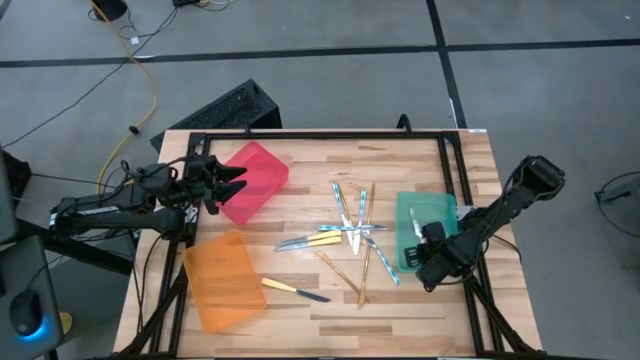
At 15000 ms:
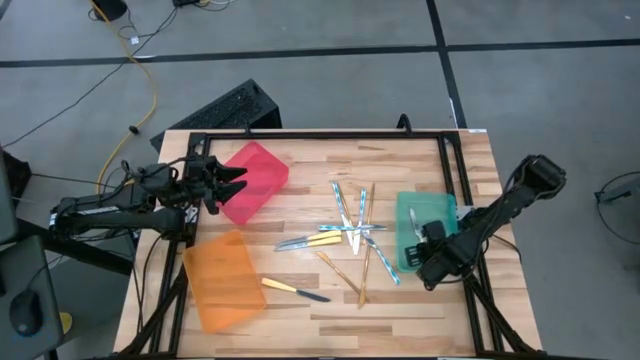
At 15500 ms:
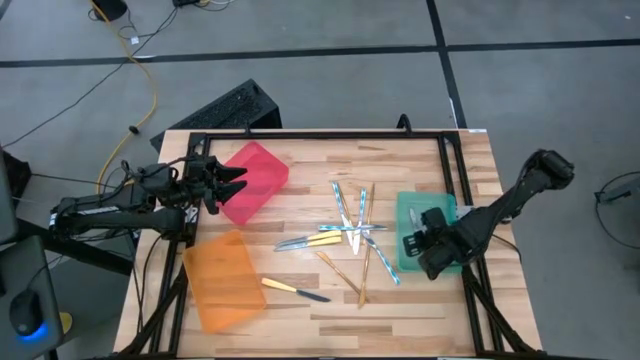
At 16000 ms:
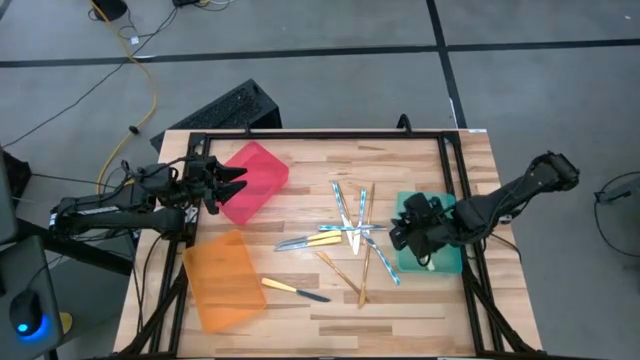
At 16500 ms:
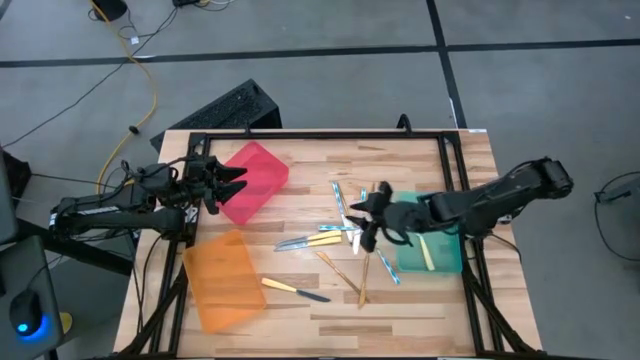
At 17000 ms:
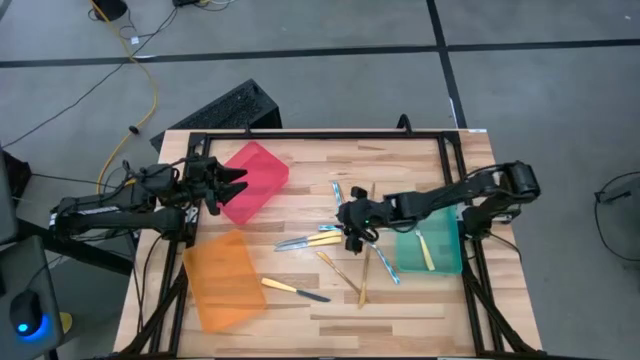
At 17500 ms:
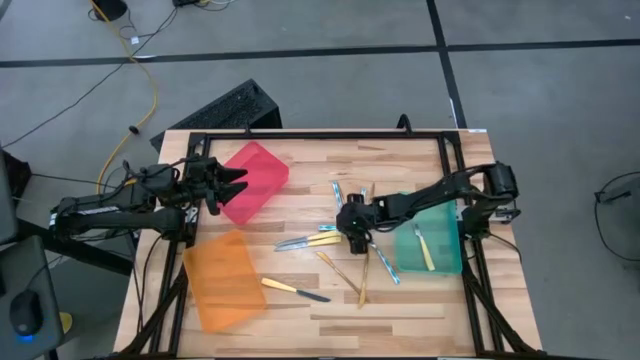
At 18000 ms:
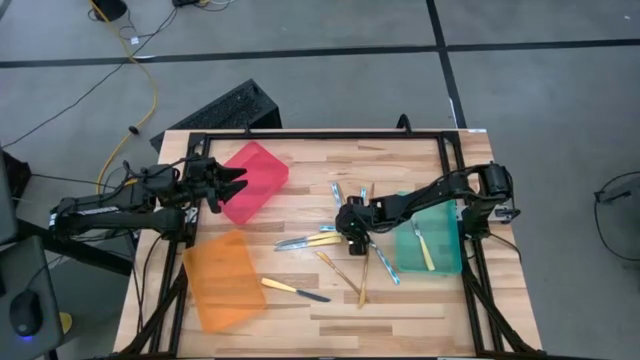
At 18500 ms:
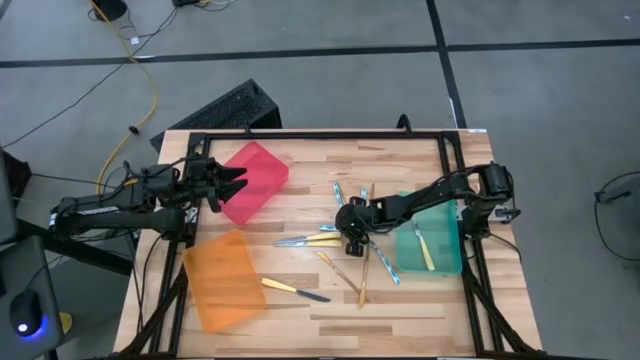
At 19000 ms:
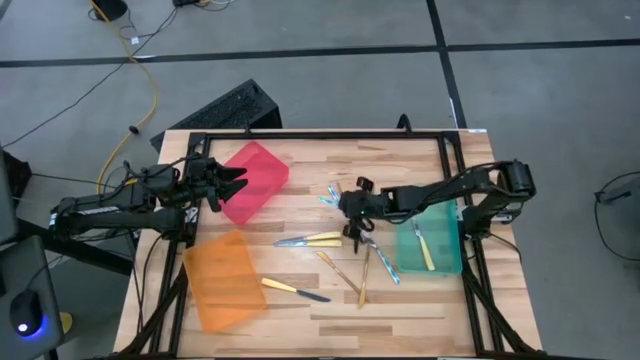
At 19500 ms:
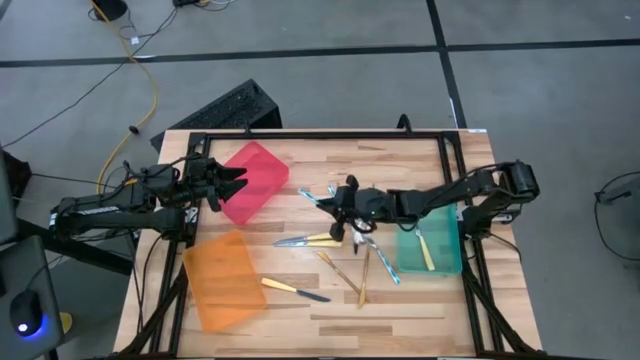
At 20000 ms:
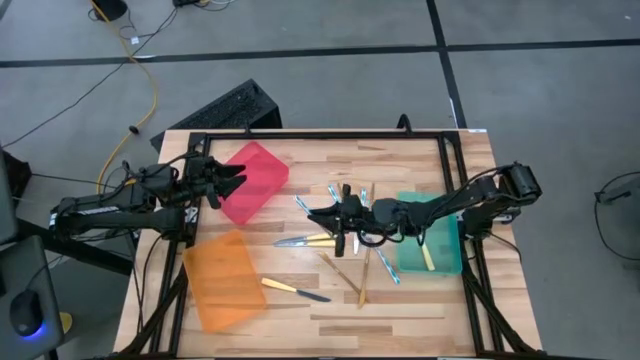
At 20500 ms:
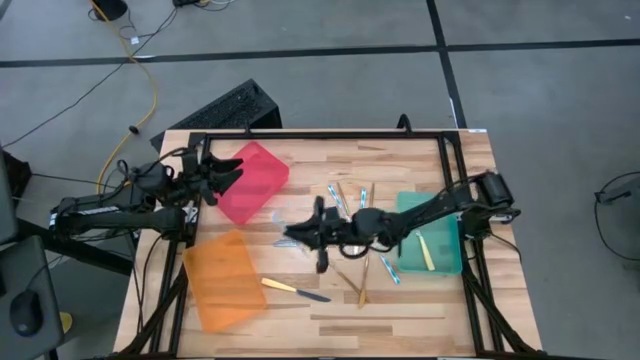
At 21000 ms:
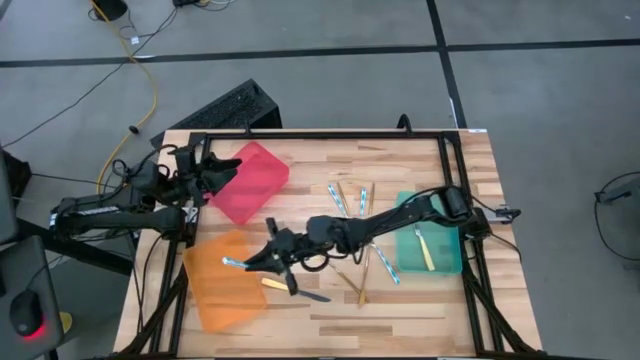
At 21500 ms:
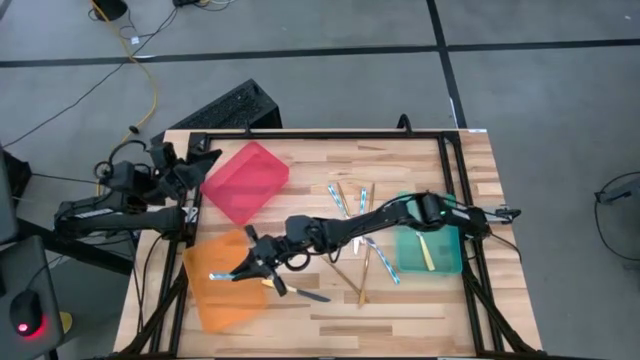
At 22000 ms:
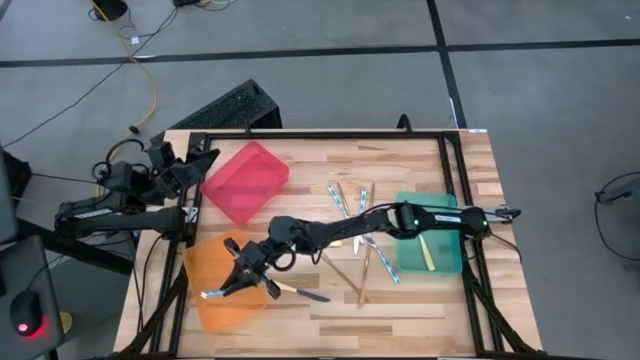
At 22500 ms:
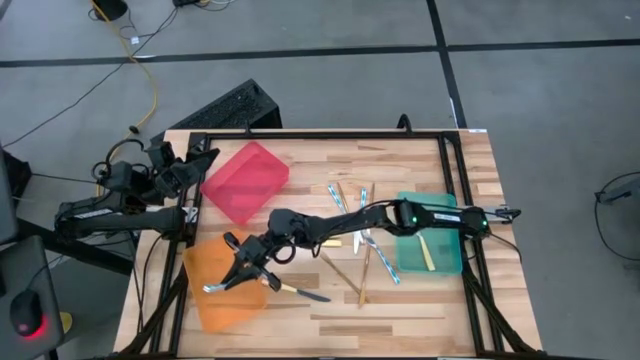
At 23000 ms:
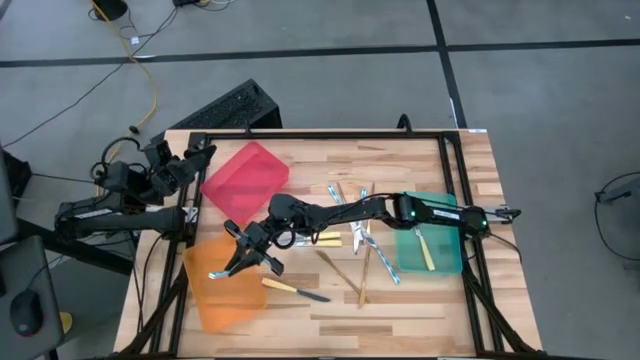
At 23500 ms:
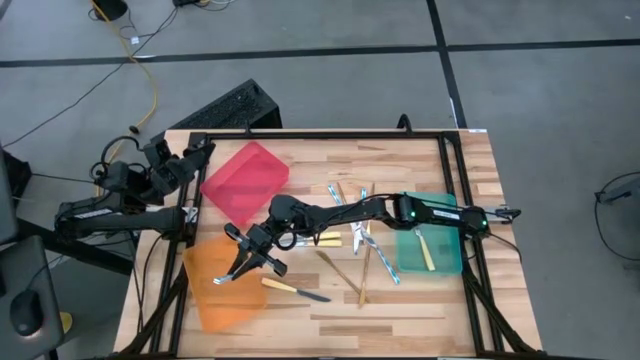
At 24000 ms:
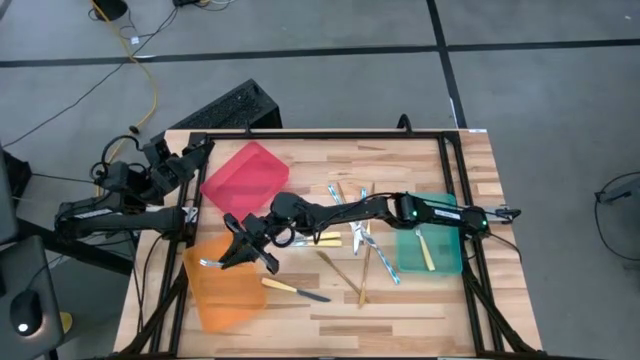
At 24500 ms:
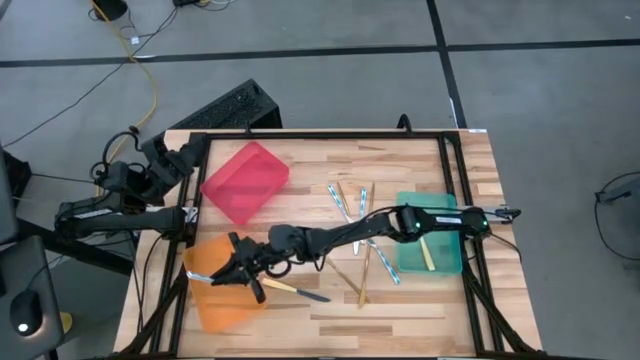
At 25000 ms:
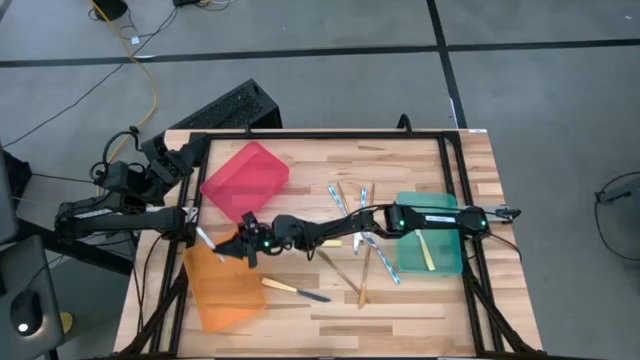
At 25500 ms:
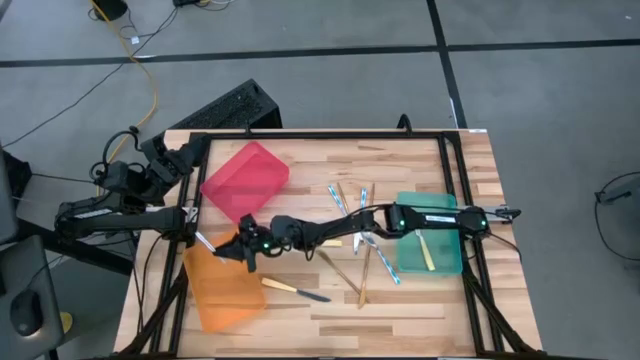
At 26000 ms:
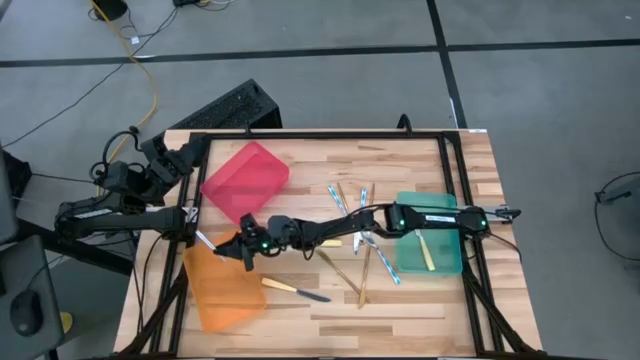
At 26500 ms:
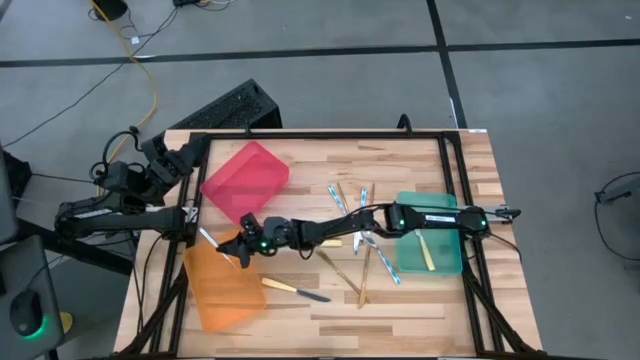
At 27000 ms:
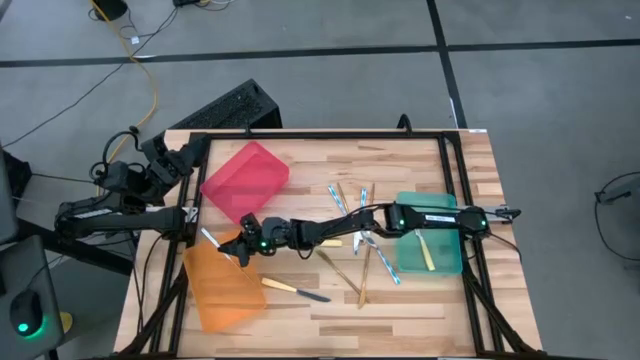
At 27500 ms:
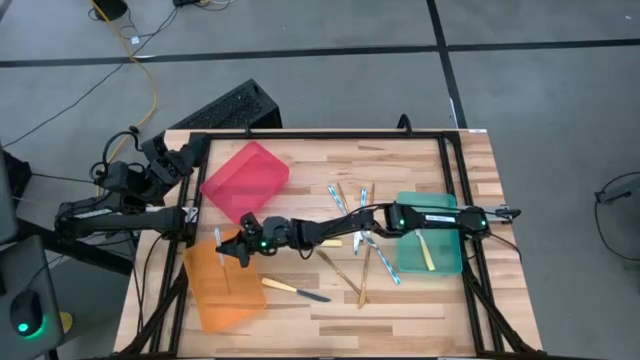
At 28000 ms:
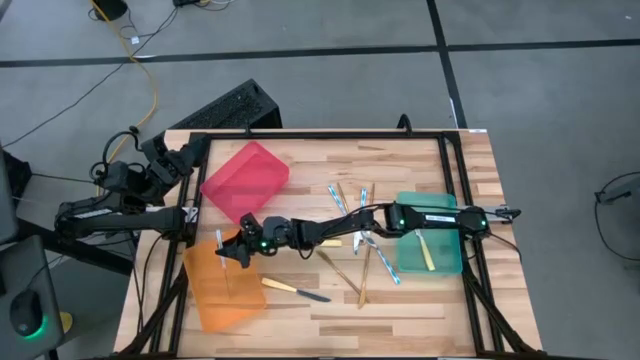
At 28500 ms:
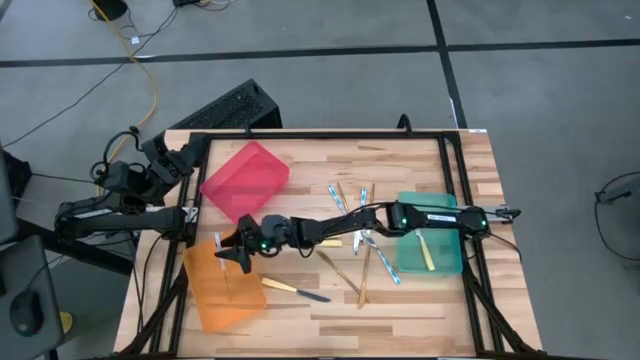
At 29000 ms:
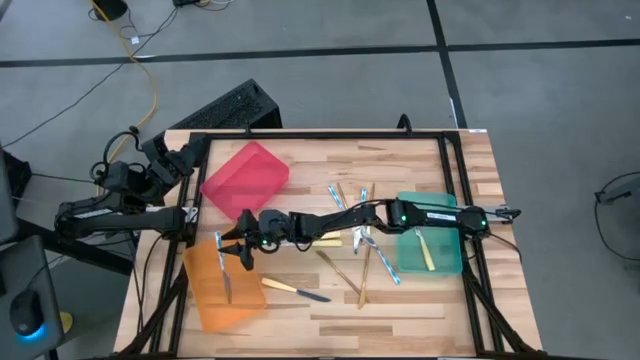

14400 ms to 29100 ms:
Task: Sort silverware by color (type)
Put the blue knife into the orange bin
